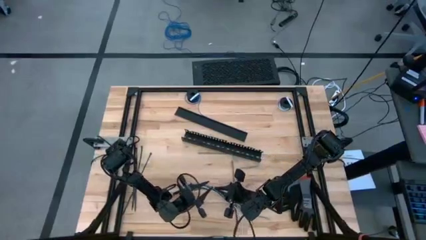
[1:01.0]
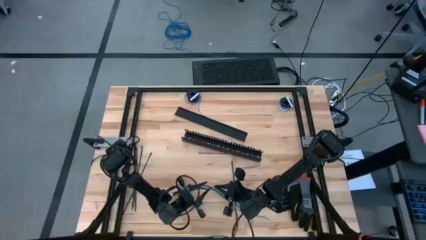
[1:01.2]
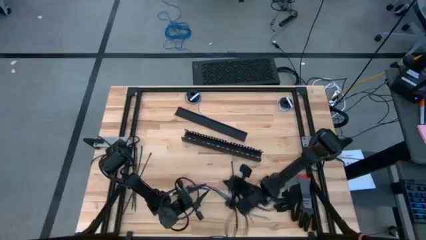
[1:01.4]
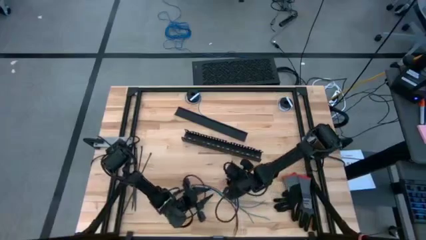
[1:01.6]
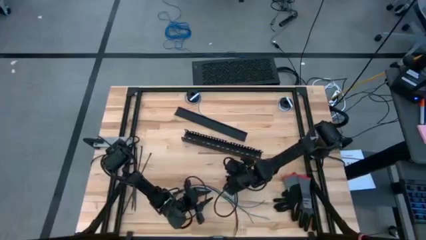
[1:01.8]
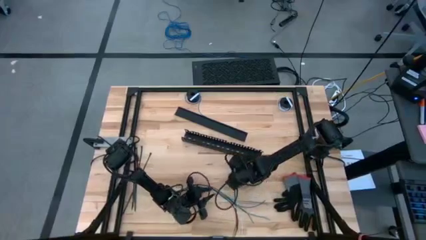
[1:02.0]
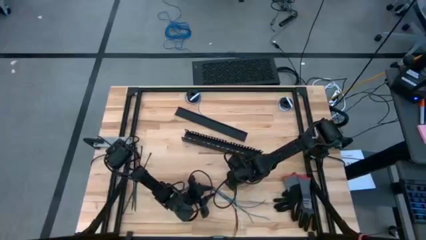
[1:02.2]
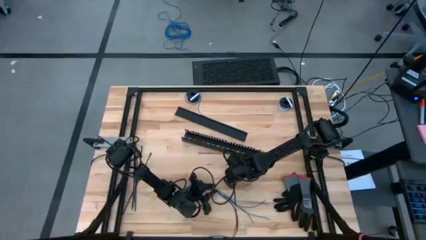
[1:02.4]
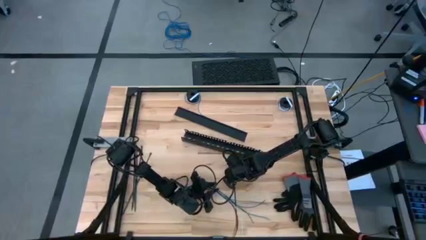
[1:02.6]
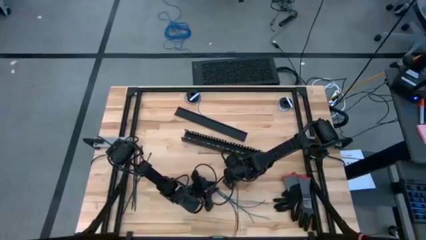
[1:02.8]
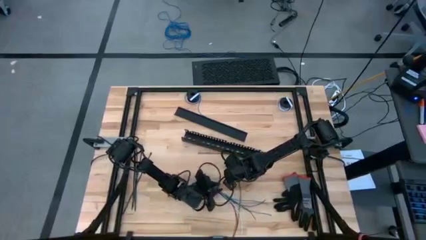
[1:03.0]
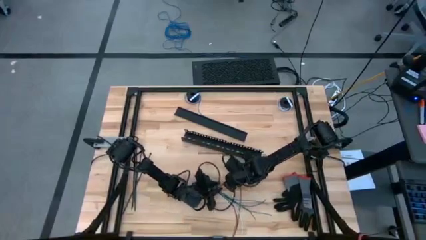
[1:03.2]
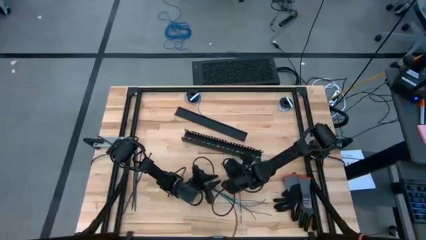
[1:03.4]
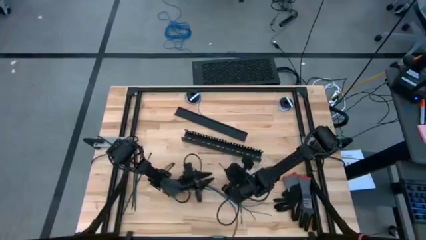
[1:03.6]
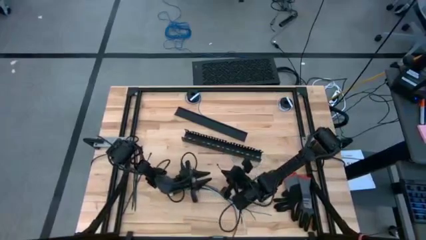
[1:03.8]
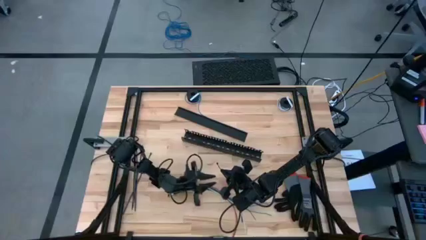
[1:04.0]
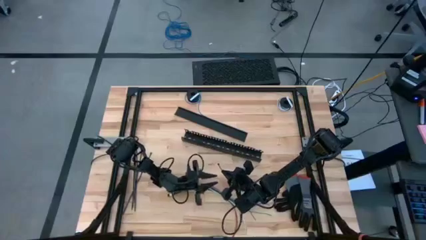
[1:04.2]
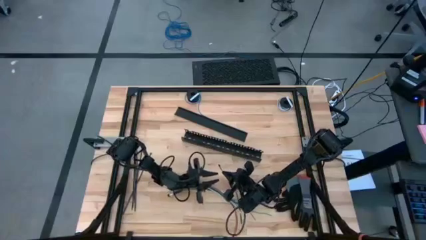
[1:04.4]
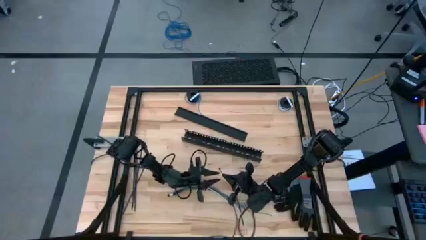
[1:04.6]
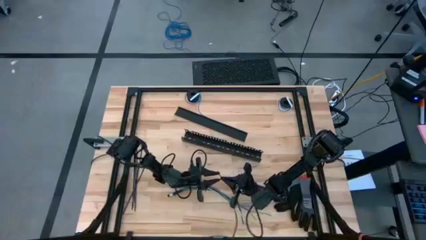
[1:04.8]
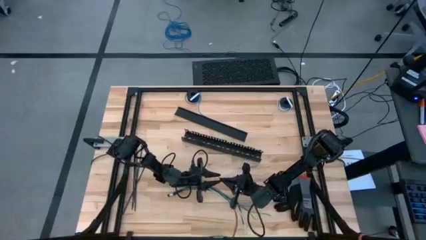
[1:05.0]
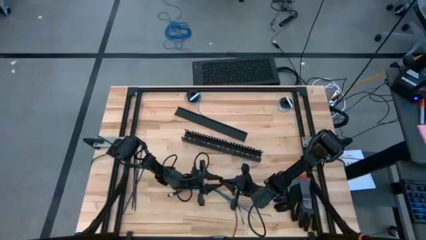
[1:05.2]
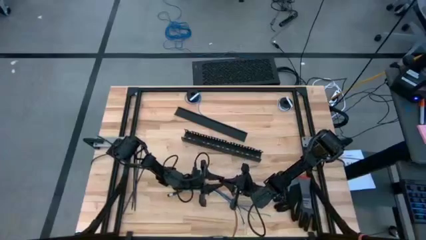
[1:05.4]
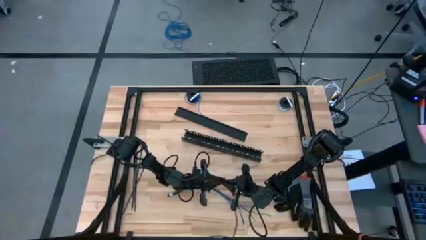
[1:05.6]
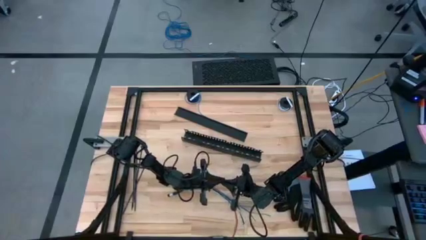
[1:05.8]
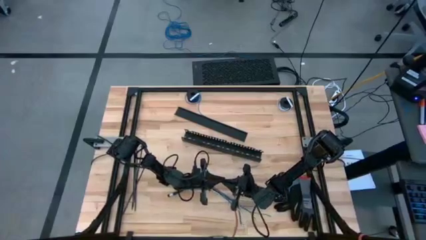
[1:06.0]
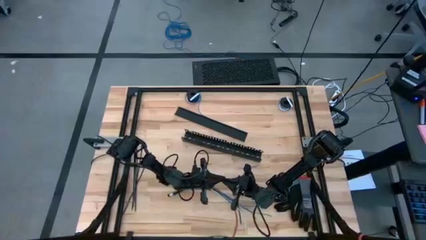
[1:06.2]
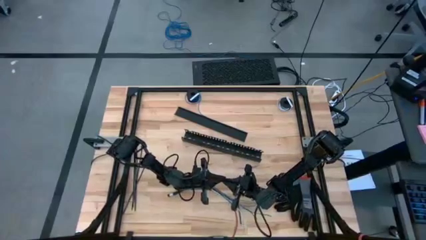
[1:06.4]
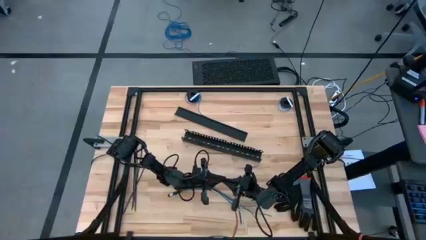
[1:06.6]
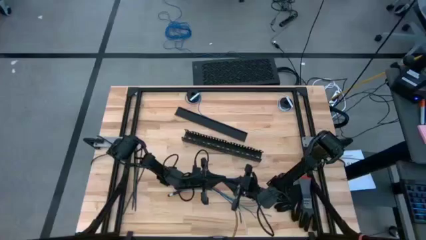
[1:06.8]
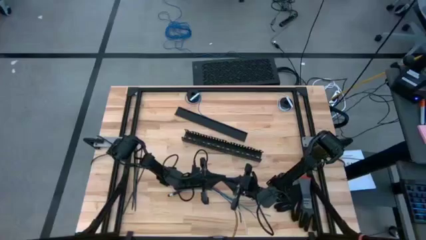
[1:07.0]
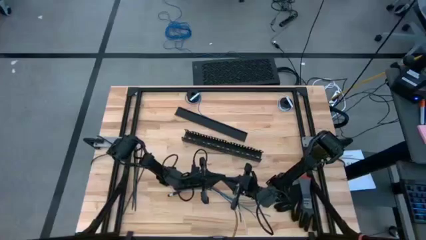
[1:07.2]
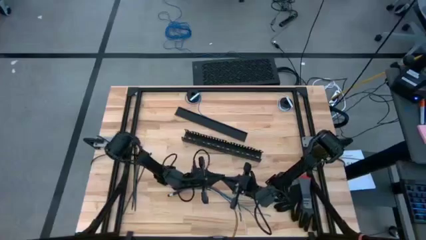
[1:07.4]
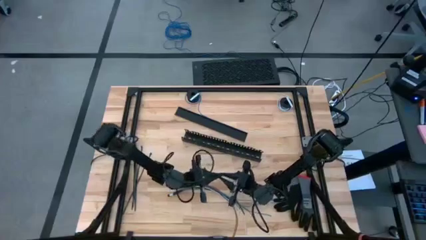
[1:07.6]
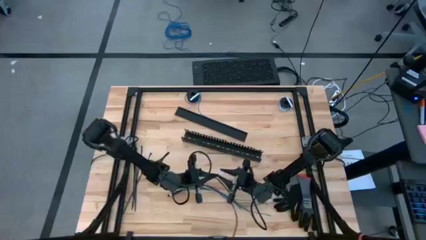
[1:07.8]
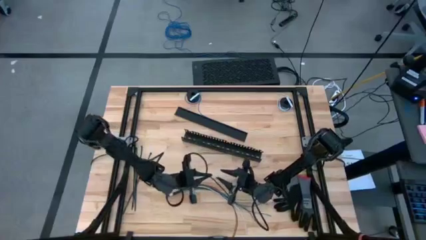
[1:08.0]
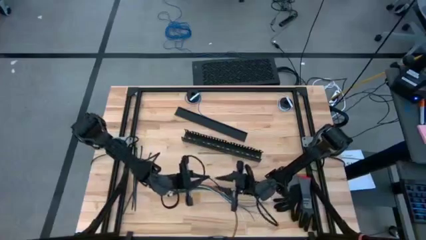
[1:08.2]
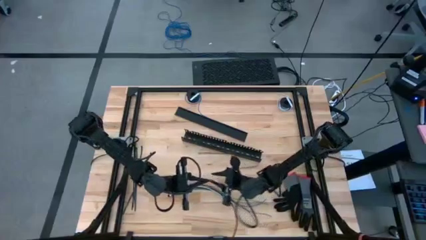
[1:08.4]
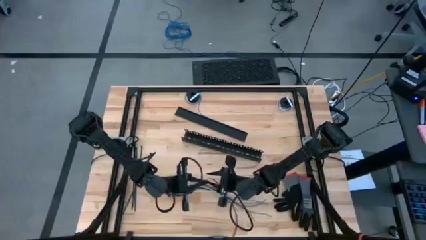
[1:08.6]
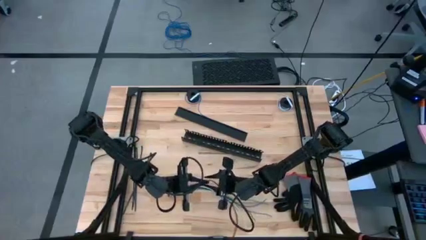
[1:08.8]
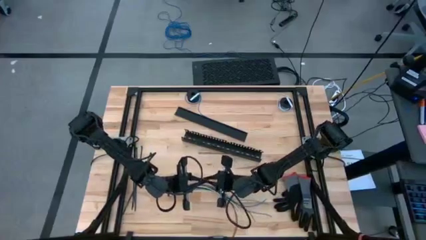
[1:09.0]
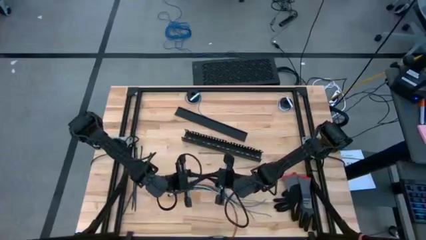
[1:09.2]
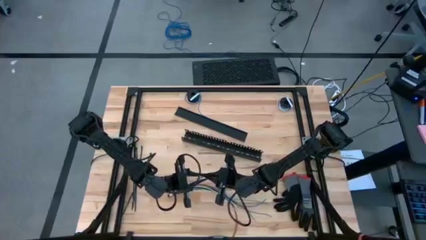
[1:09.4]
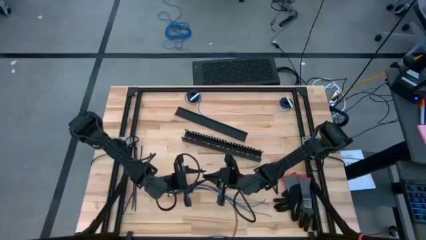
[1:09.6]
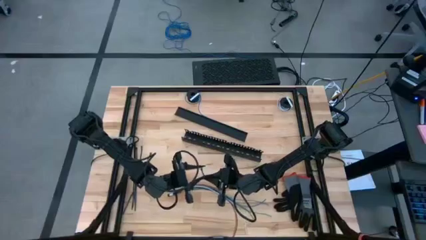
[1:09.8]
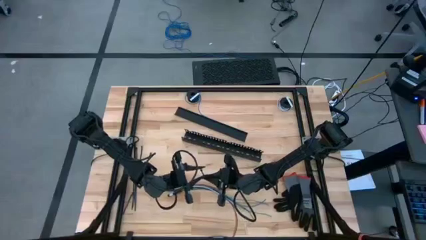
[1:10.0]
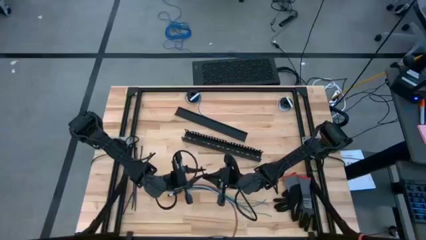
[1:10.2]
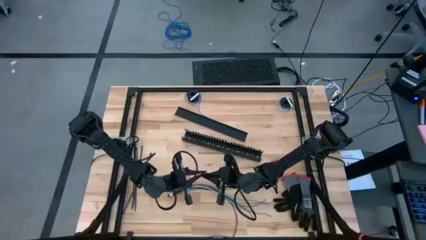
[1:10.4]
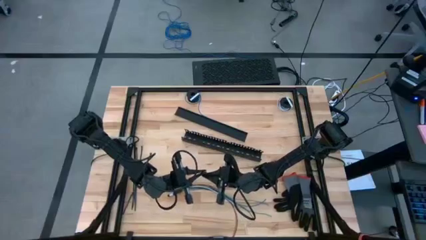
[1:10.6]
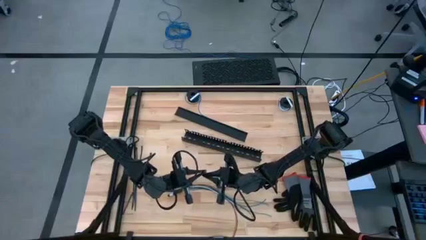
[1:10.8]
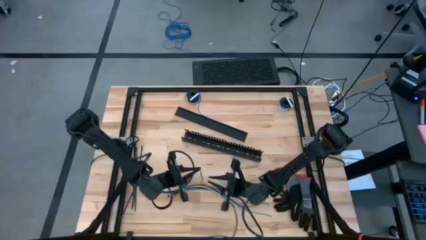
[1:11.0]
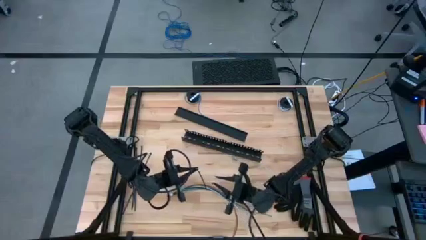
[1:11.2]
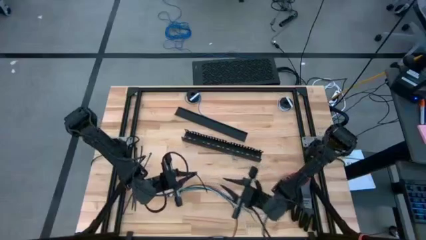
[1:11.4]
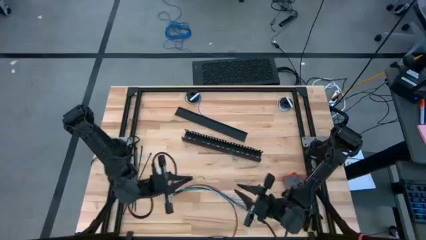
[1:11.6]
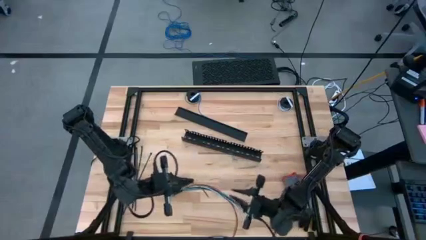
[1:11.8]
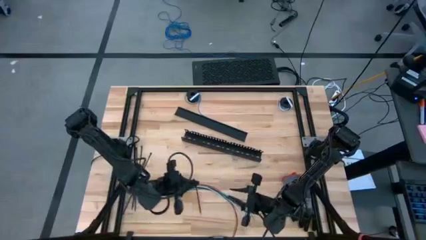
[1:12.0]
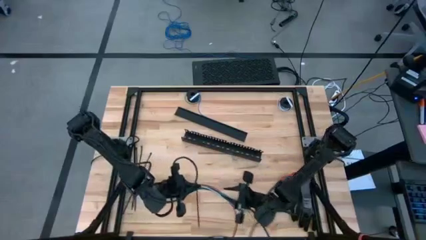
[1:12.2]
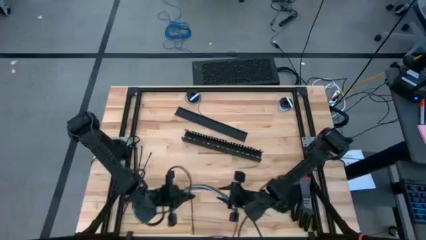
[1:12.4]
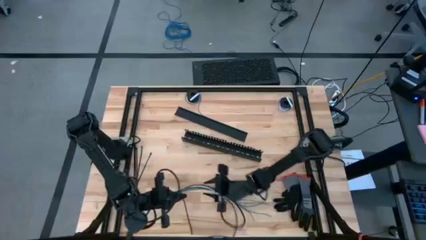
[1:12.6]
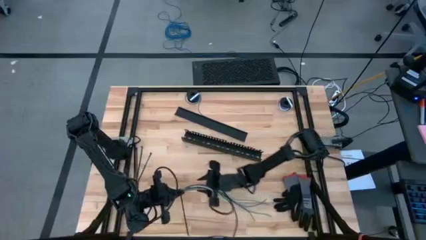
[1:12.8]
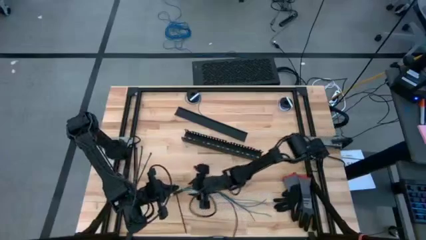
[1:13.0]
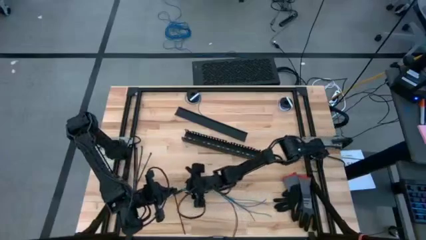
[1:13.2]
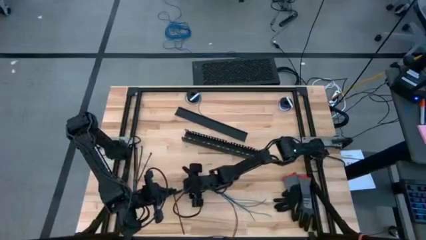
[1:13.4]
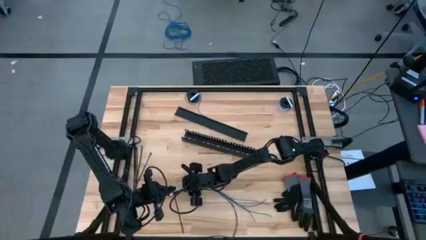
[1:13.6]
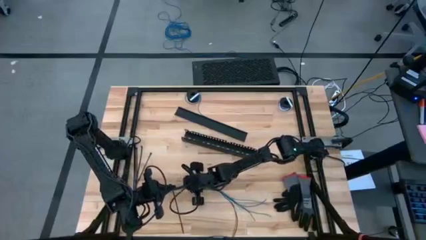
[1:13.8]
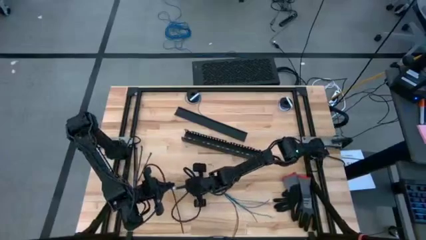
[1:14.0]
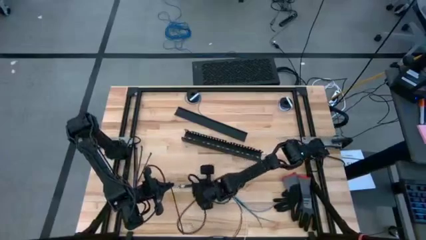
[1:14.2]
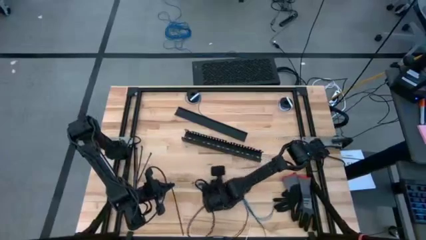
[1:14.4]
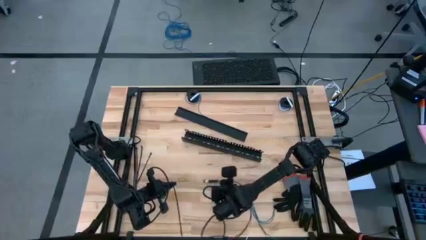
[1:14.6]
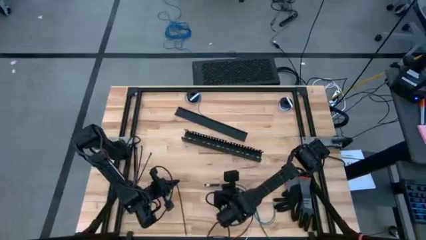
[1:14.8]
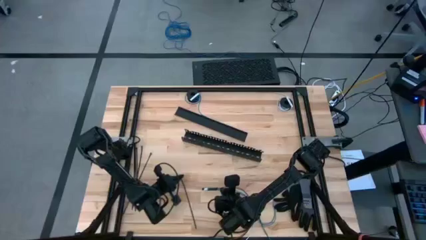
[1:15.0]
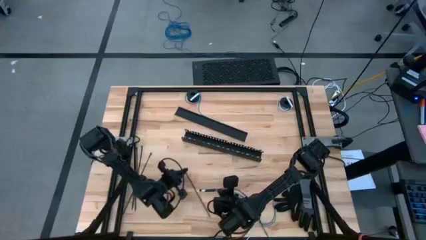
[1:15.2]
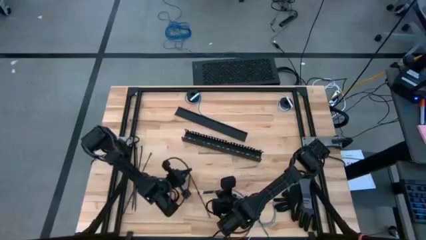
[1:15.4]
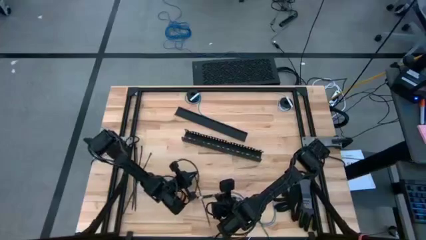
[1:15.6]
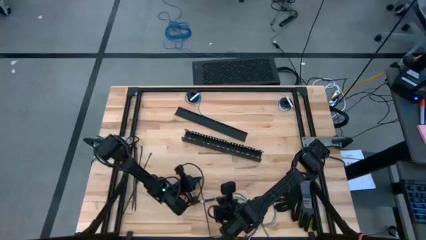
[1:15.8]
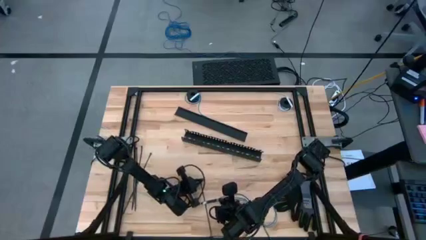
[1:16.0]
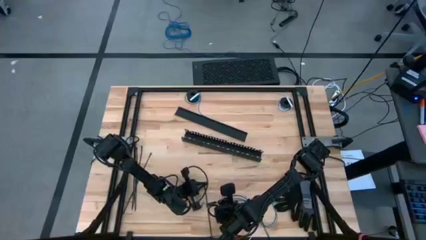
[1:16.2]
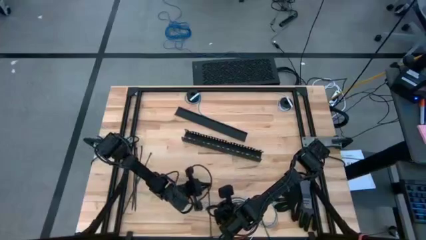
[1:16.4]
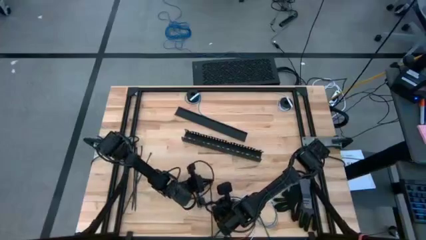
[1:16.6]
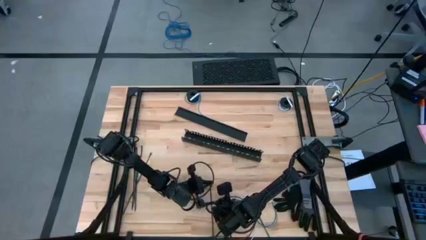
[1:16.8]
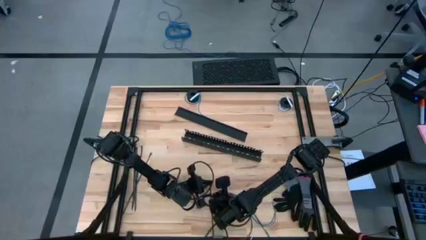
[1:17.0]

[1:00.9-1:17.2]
Task: Ziptie cables
Wrap the cable wires with the black zip tie
